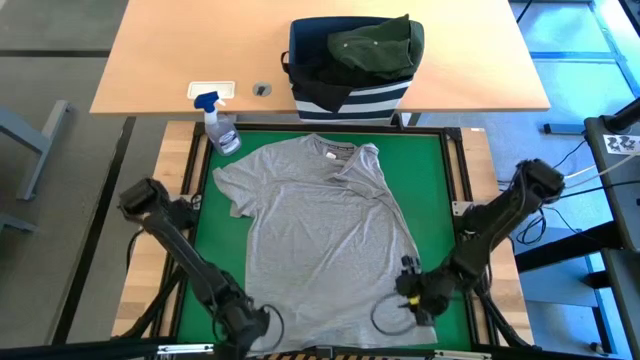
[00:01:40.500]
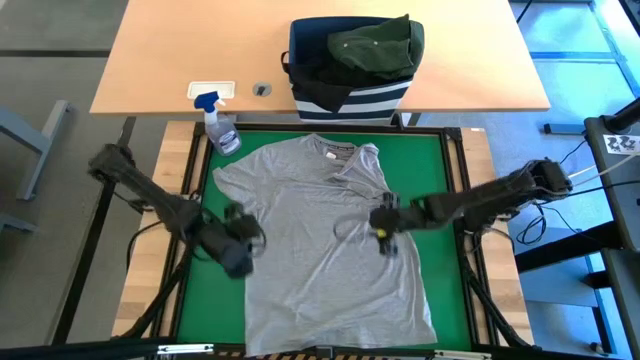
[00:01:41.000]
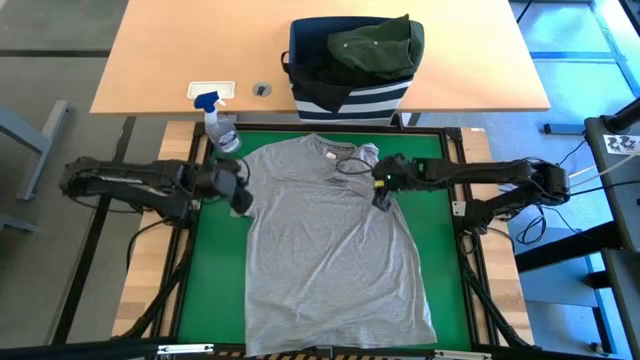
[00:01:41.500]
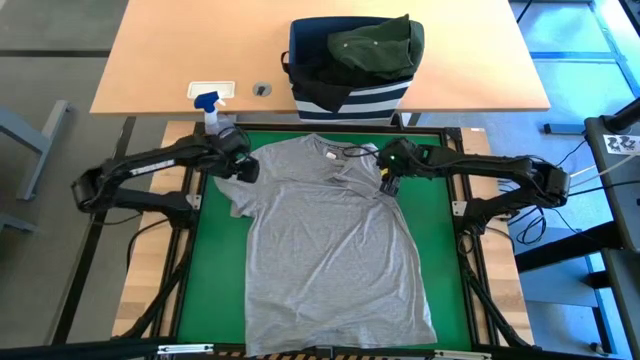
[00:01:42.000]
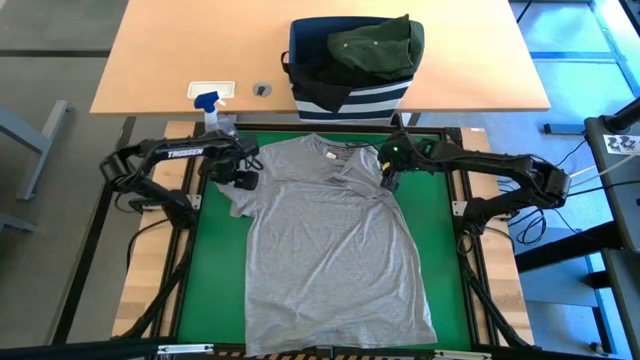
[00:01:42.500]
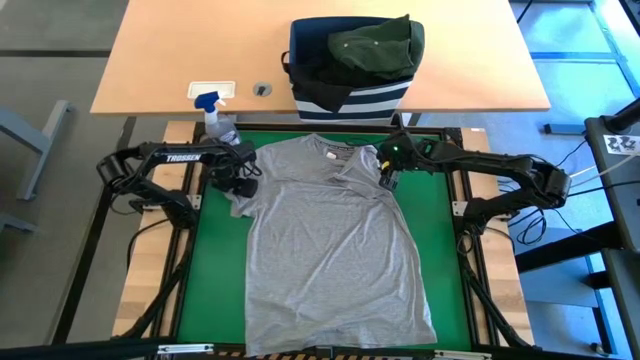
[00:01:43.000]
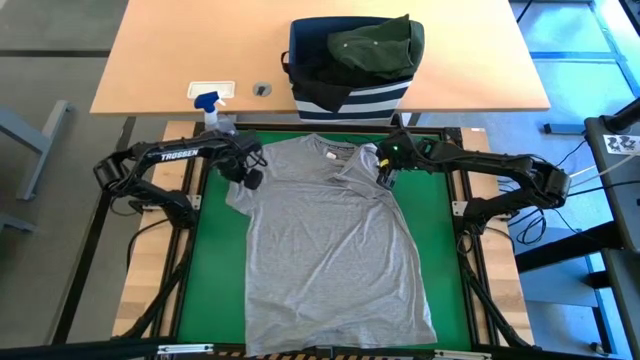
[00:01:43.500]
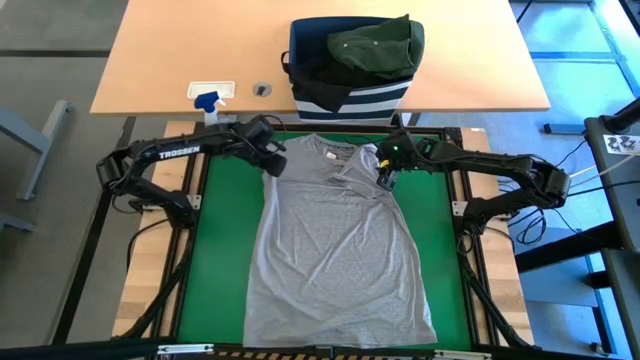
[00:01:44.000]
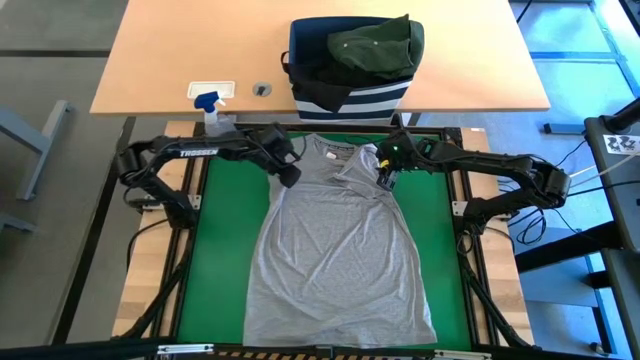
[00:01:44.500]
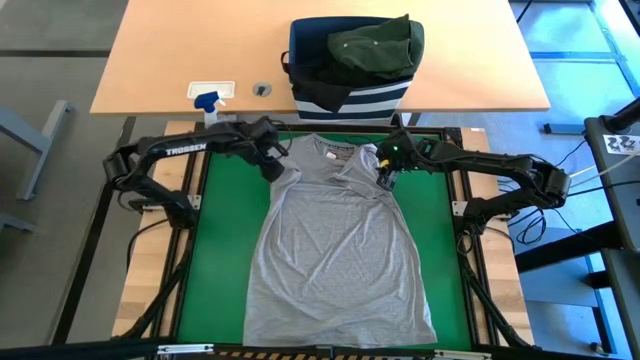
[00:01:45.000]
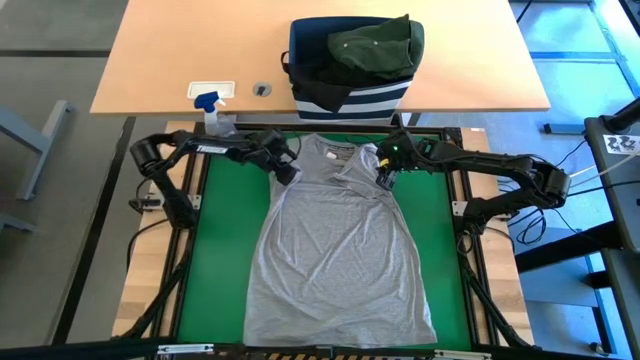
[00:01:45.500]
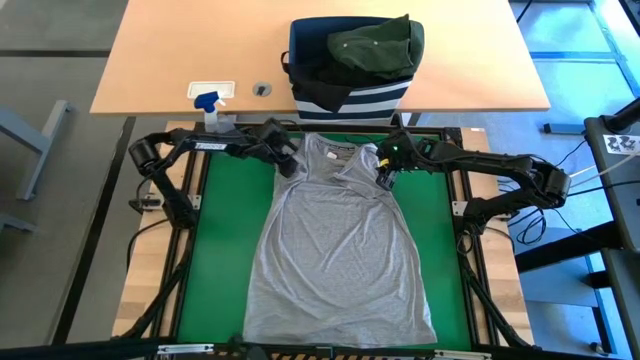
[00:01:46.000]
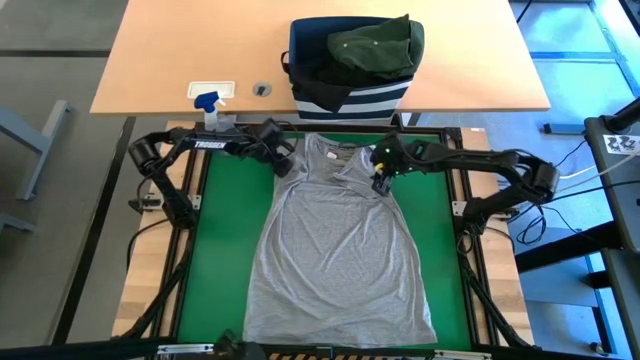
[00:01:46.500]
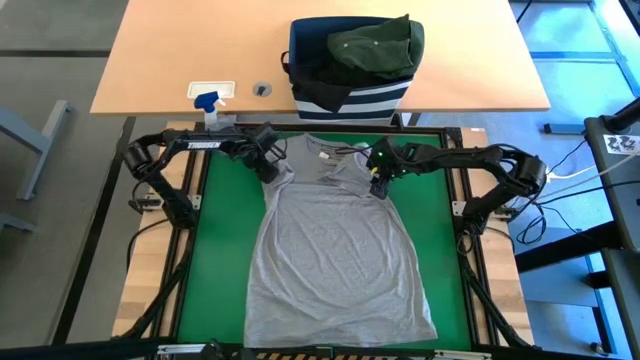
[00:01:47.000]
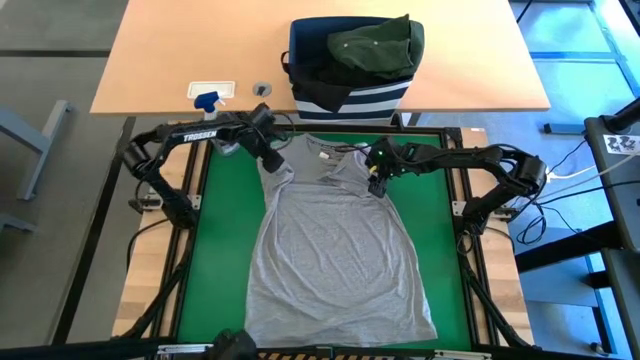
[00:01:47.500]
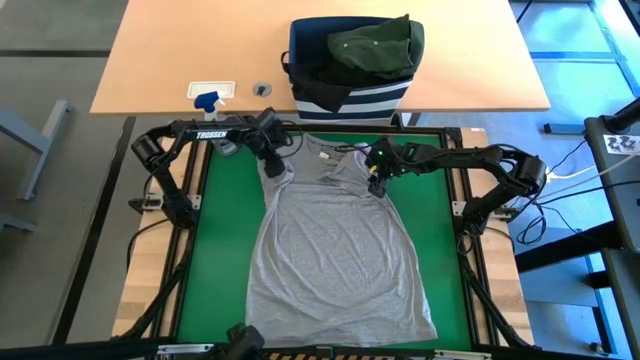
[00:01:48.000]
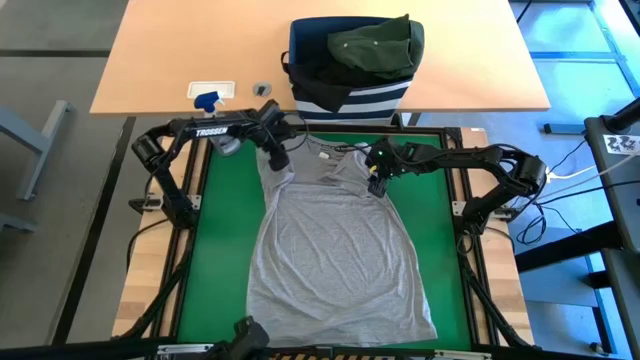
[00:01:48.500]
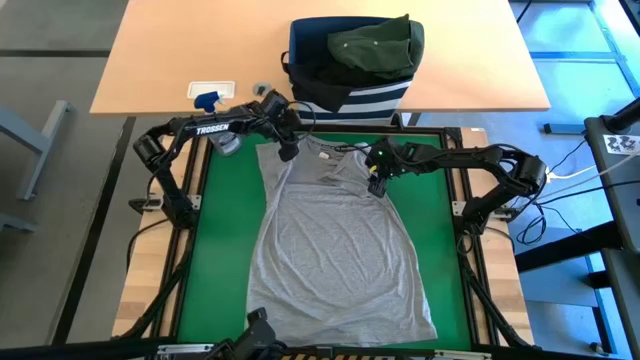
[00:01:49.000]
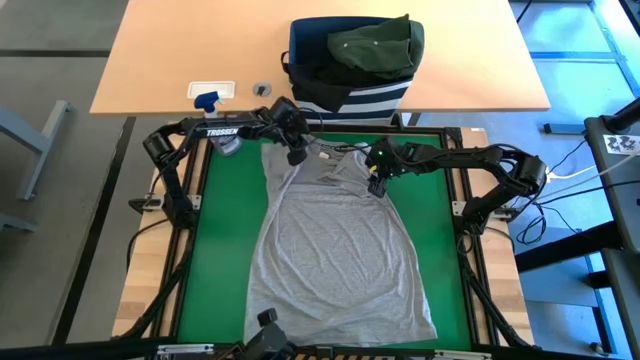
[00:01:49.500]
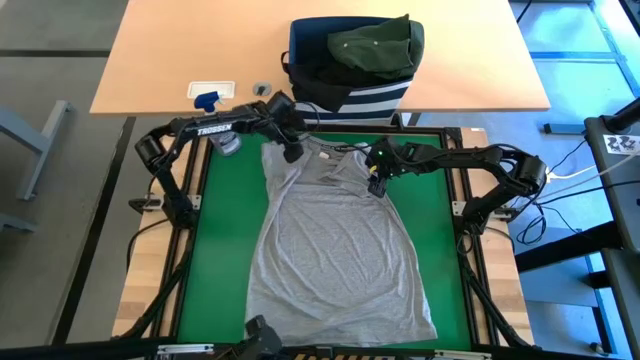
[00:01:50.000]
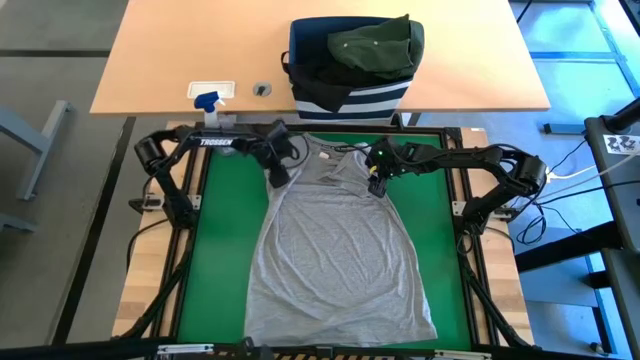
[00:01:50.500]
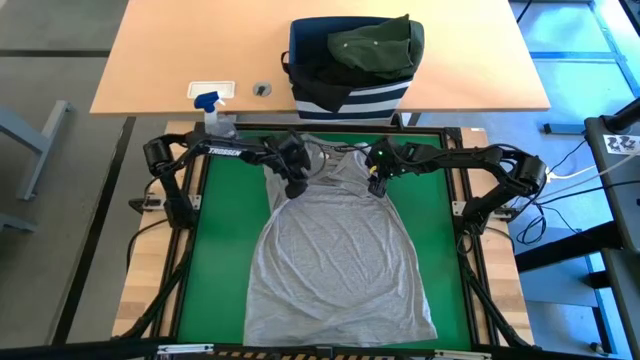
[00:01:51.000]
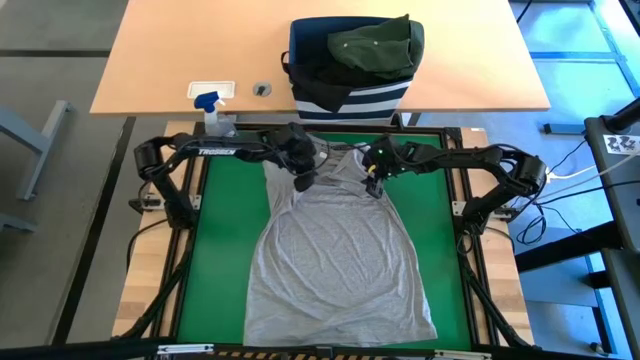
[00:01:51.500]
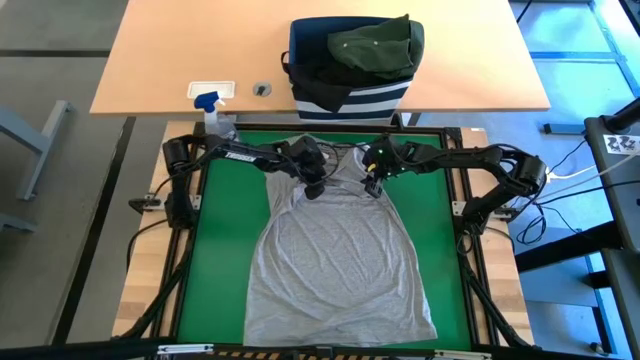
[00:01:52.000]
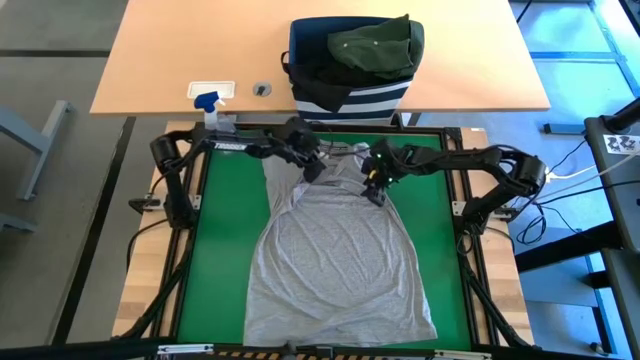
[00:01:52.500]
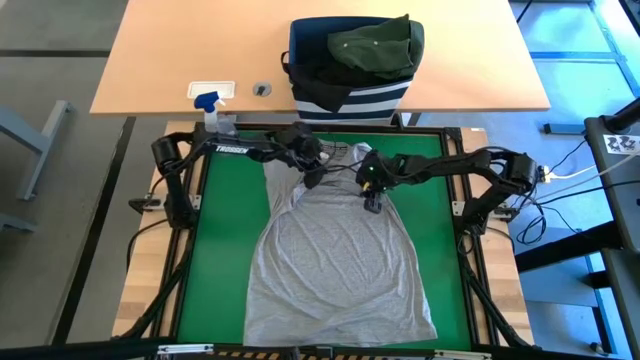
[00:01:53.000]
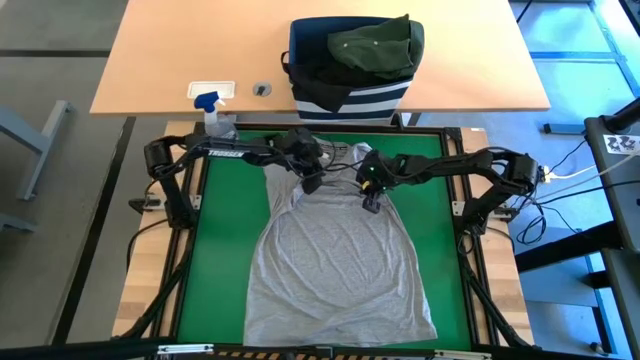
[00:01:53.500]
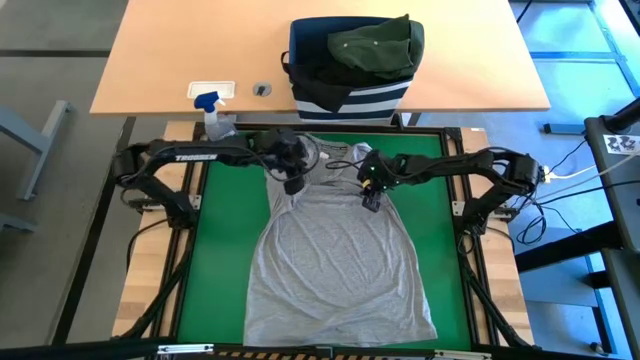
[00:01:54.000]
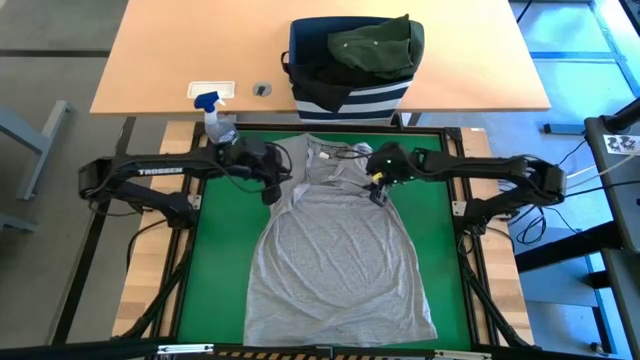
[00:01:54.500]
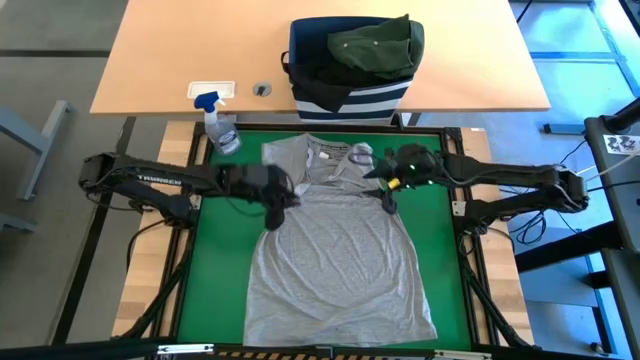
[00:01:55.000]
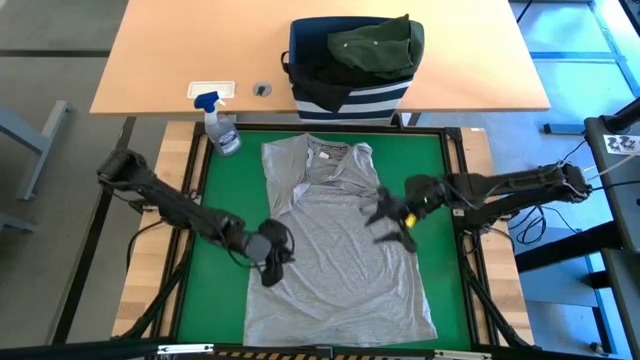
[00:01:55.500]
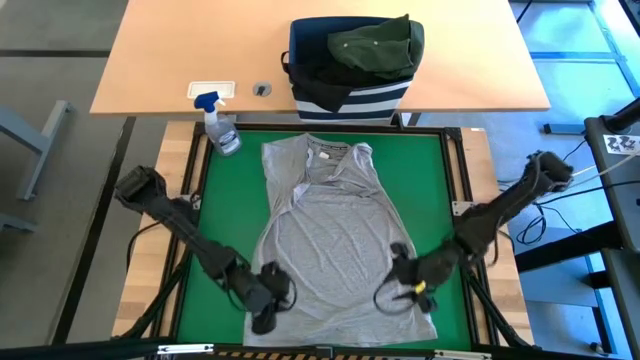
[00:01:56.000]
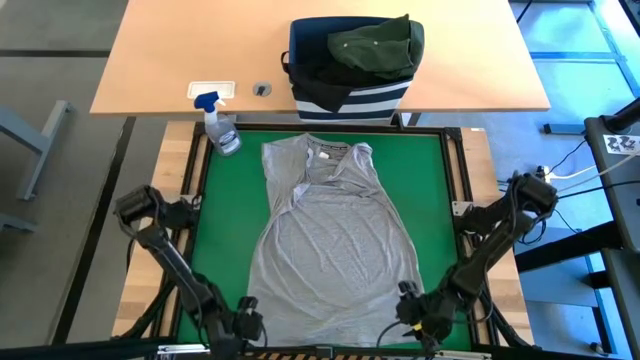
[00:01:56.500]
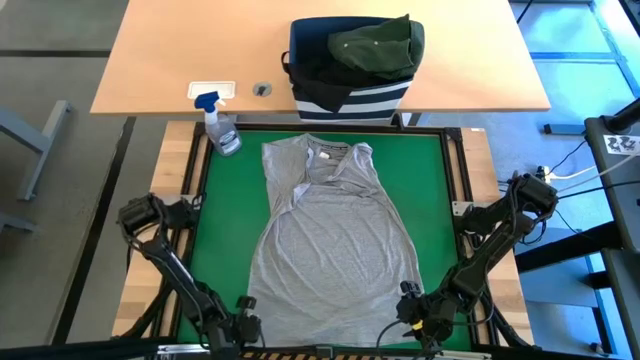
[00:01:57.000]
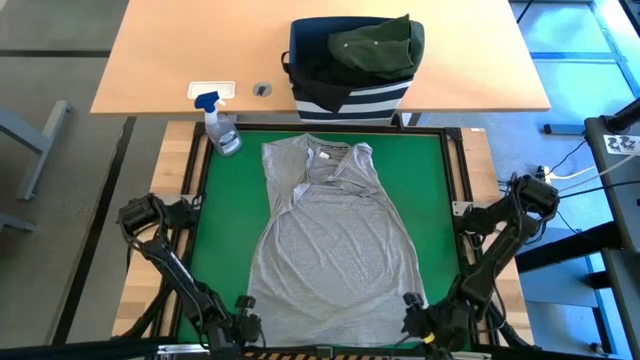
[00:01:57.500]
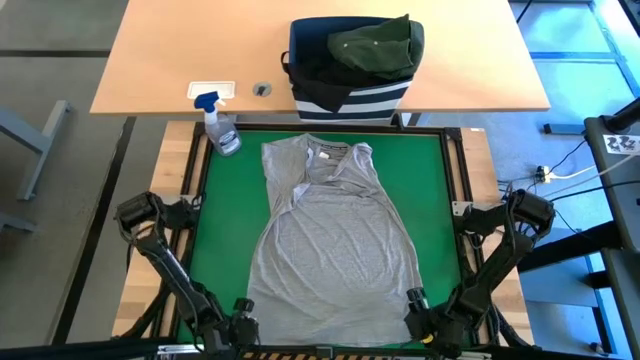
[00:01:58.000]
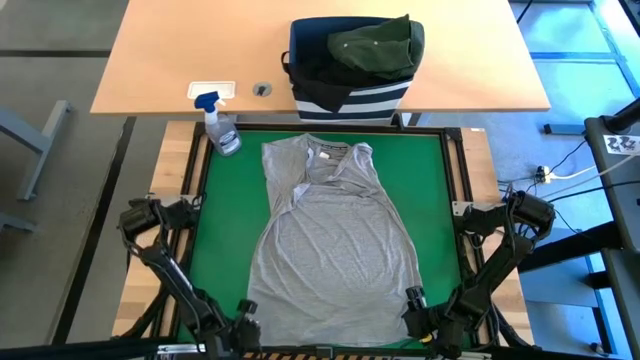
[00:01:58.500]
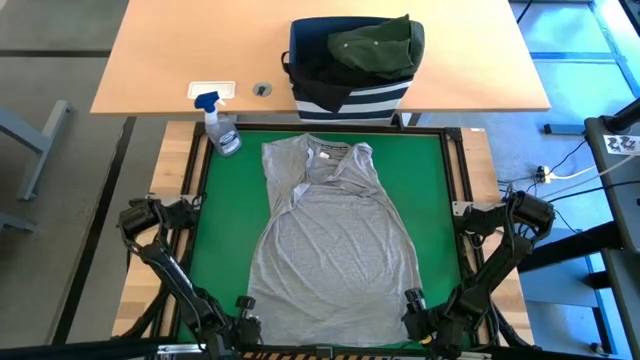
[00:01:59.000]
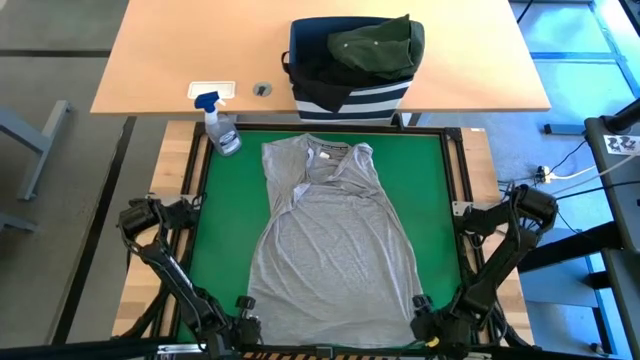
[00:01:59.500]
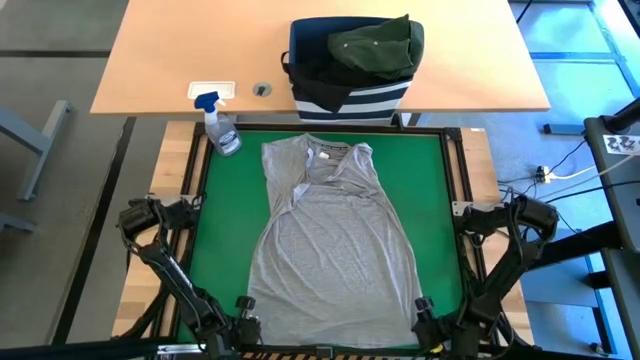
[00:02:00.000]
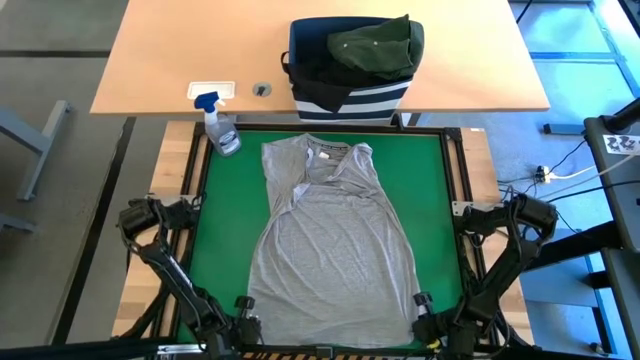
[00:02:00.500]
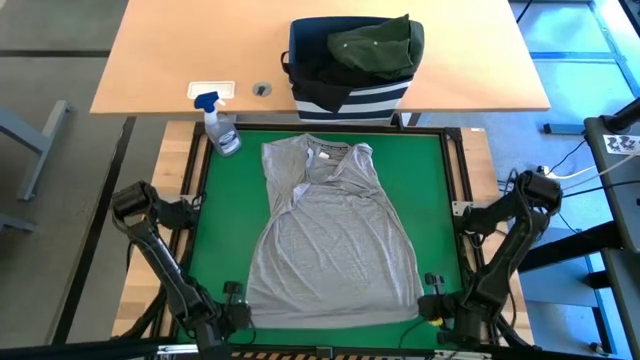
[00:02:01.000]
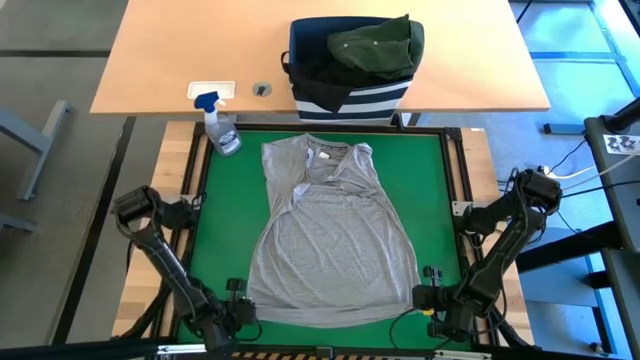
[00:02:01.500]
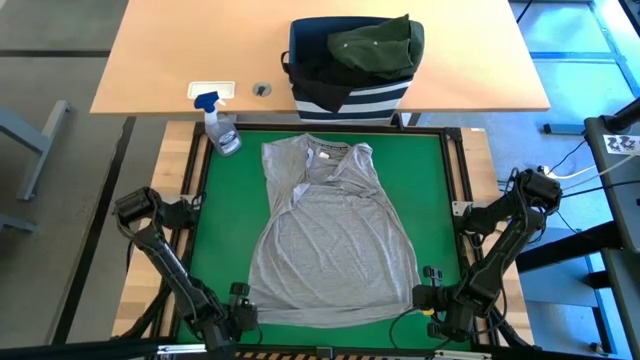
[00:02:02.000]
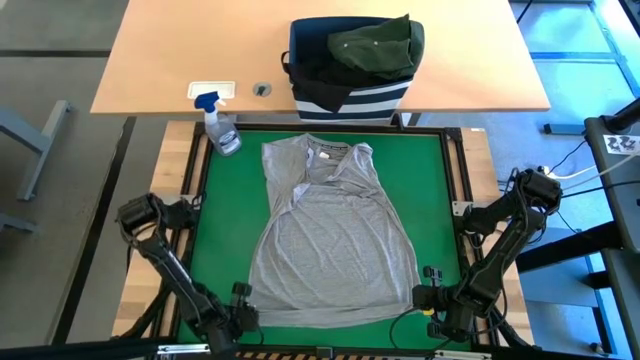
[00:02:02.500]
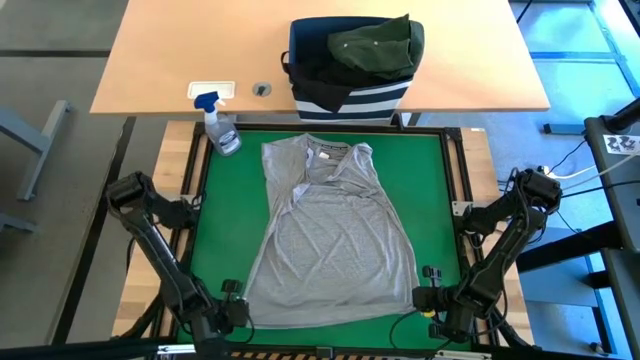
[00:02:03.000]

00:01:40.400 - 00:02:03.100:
Task: Fold Laundry from Bin
Fold the gray shirt
